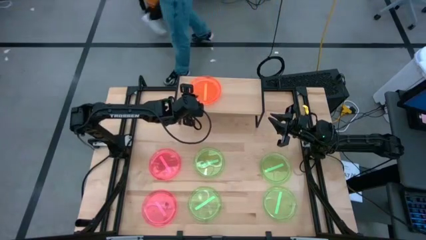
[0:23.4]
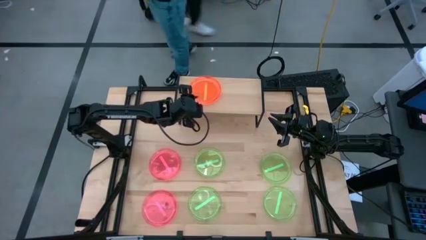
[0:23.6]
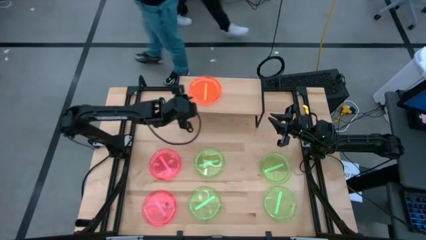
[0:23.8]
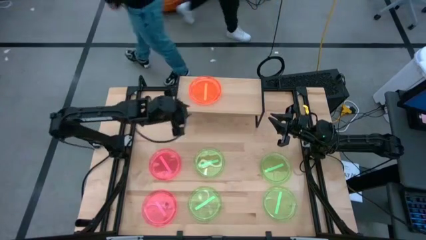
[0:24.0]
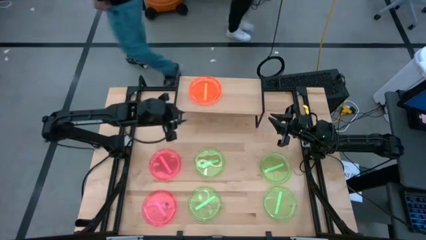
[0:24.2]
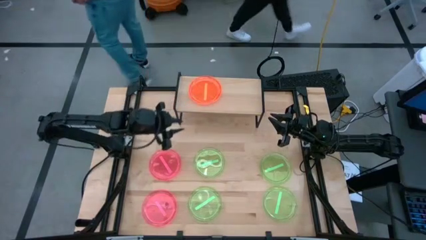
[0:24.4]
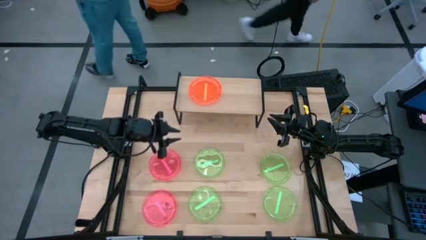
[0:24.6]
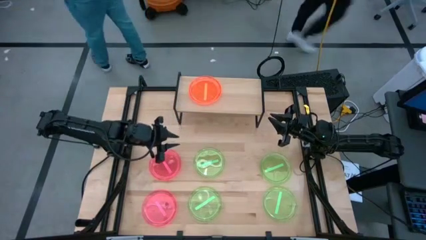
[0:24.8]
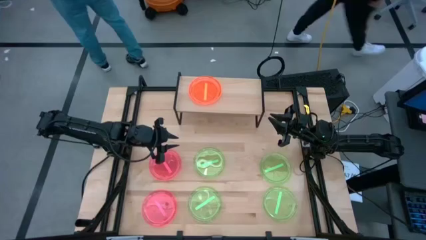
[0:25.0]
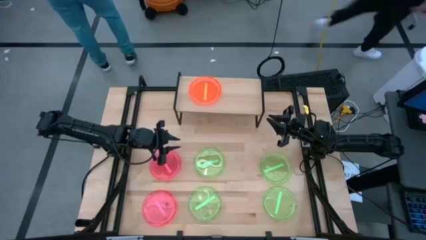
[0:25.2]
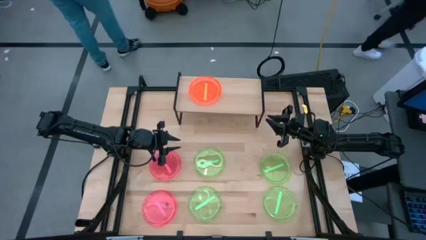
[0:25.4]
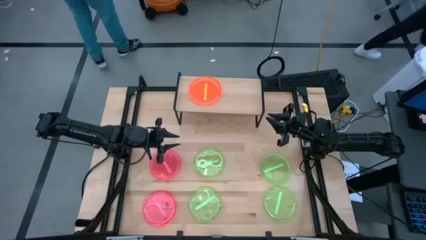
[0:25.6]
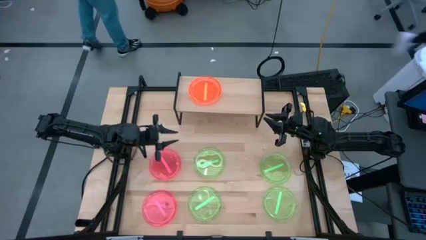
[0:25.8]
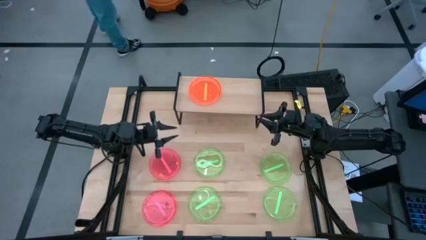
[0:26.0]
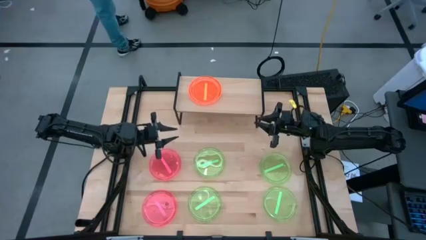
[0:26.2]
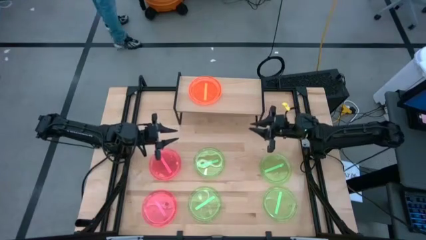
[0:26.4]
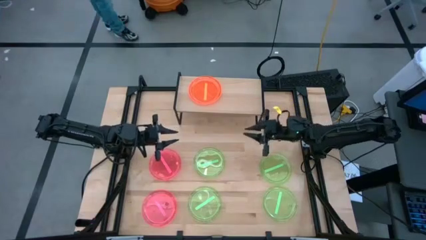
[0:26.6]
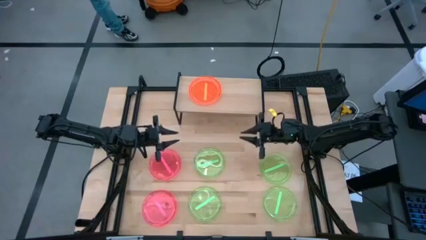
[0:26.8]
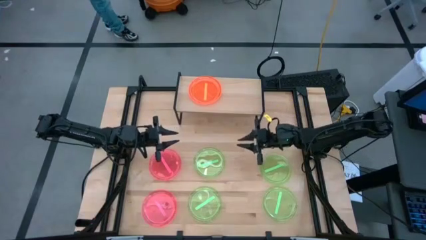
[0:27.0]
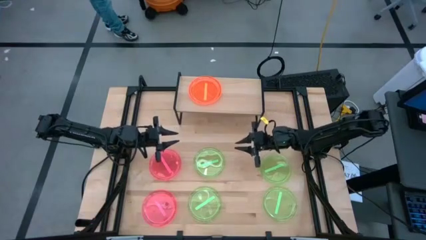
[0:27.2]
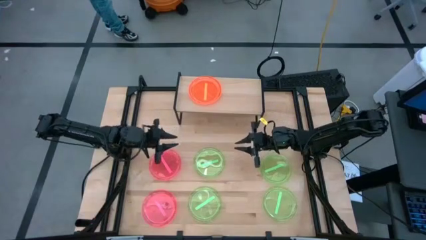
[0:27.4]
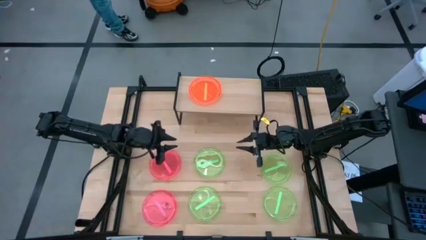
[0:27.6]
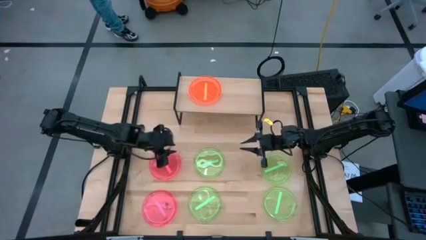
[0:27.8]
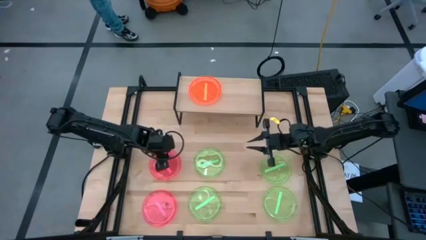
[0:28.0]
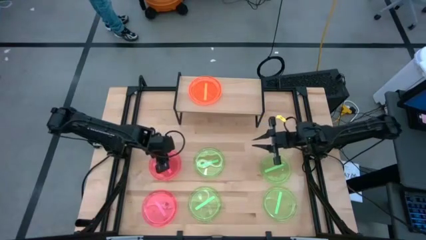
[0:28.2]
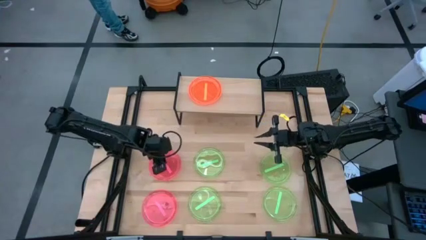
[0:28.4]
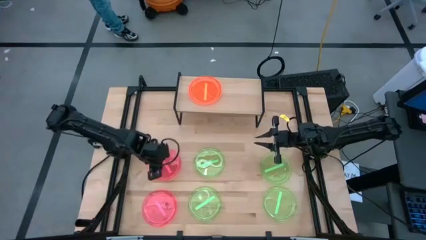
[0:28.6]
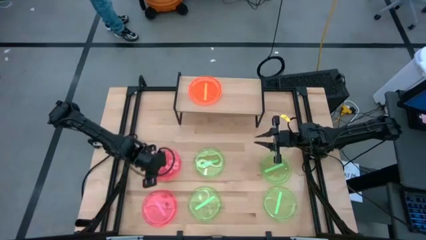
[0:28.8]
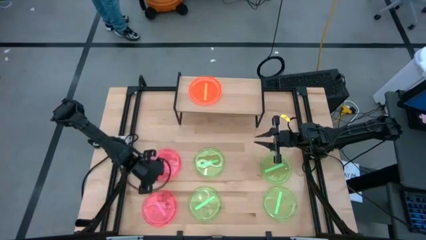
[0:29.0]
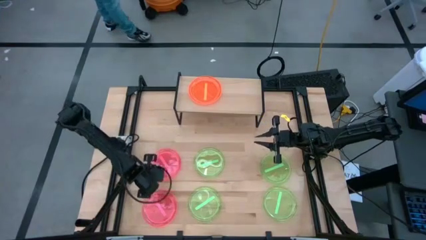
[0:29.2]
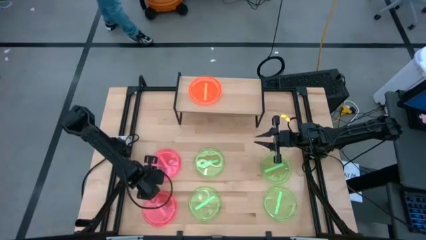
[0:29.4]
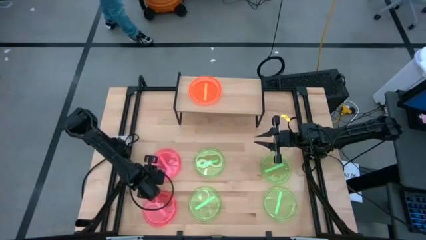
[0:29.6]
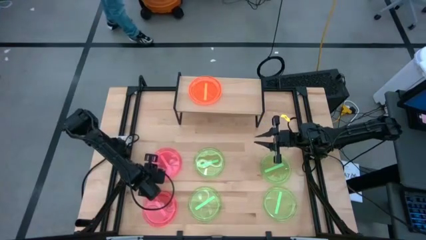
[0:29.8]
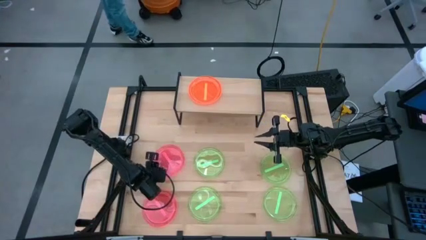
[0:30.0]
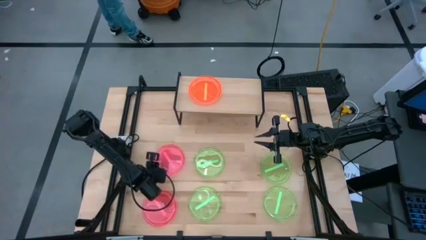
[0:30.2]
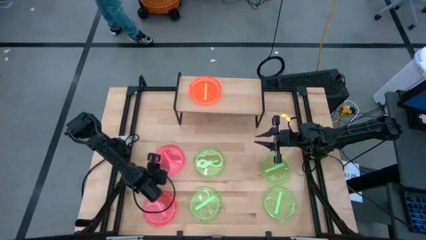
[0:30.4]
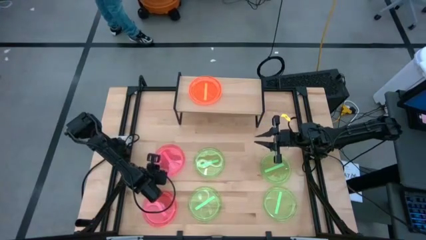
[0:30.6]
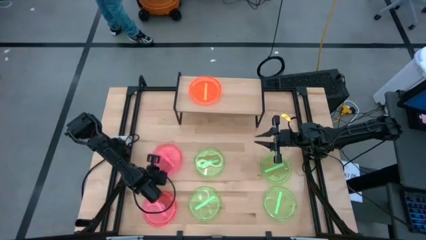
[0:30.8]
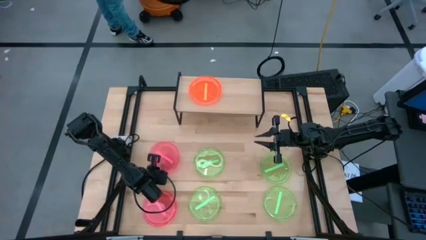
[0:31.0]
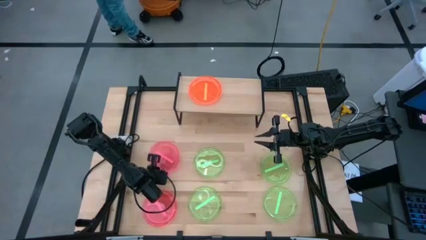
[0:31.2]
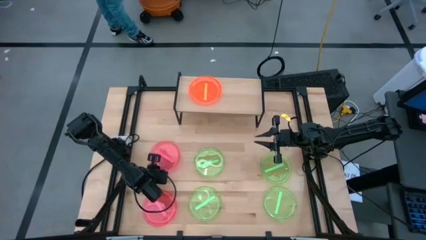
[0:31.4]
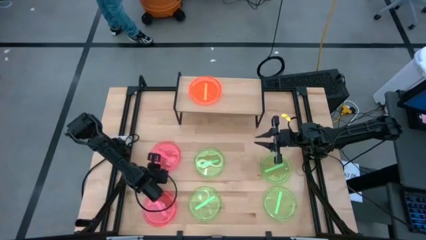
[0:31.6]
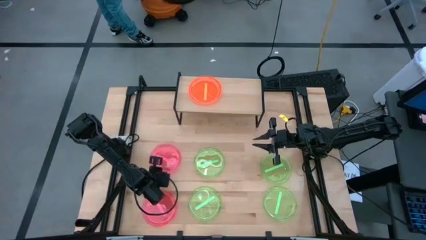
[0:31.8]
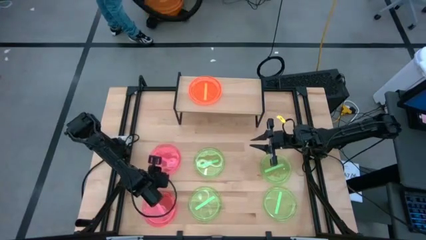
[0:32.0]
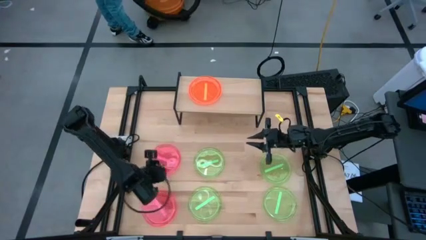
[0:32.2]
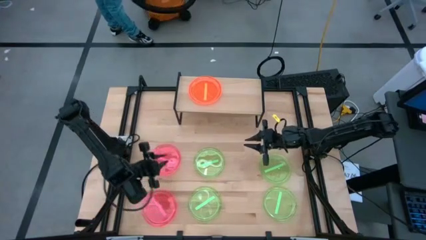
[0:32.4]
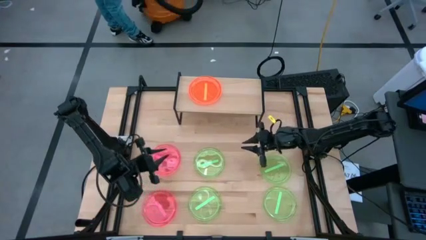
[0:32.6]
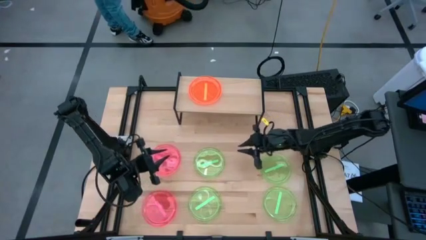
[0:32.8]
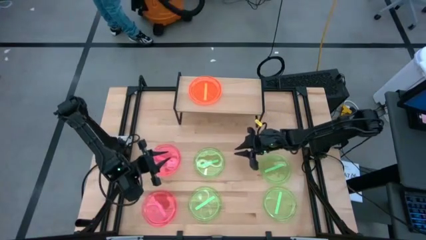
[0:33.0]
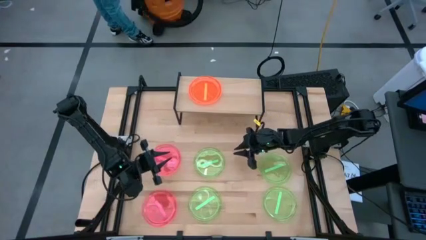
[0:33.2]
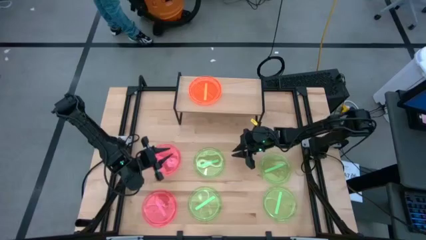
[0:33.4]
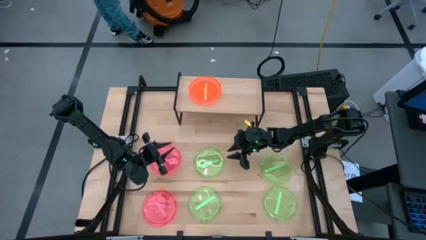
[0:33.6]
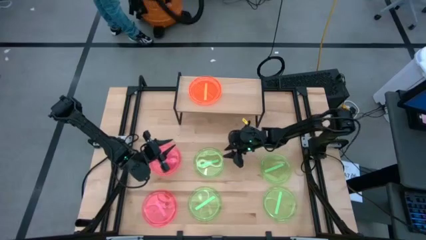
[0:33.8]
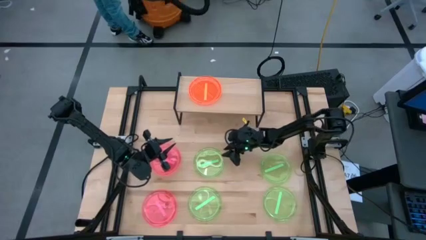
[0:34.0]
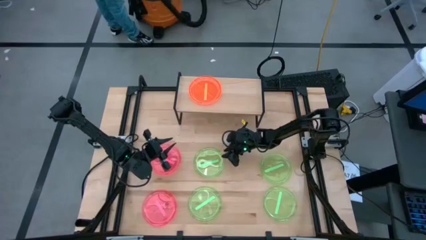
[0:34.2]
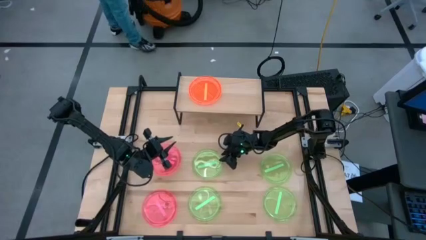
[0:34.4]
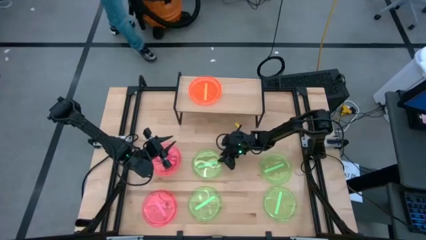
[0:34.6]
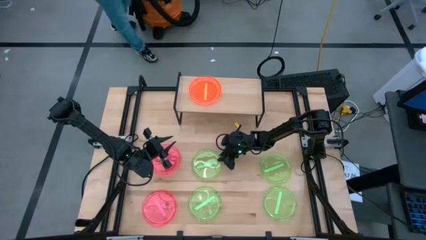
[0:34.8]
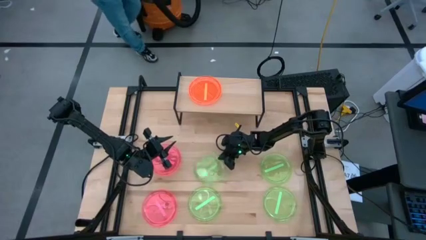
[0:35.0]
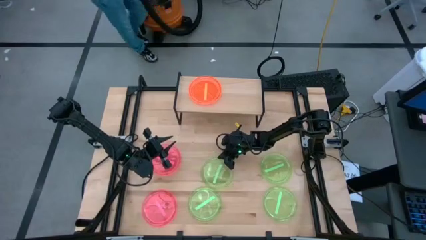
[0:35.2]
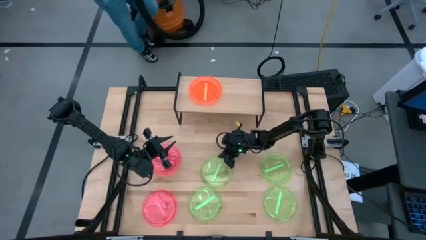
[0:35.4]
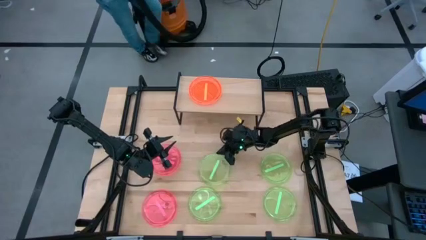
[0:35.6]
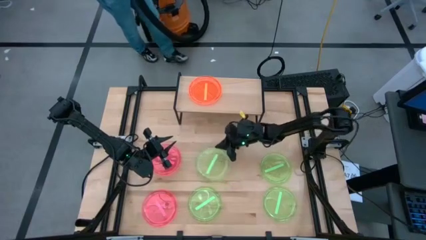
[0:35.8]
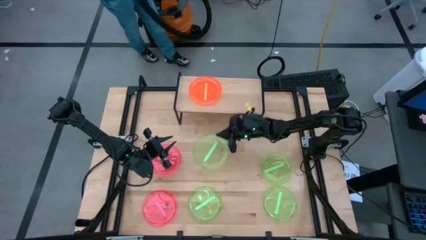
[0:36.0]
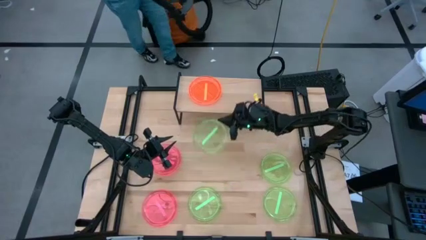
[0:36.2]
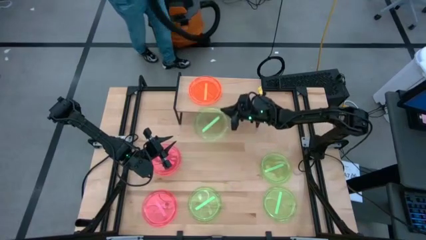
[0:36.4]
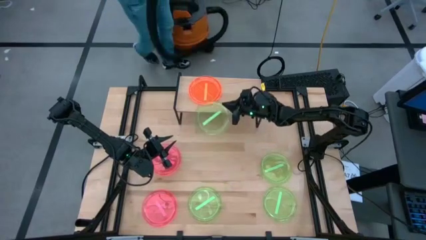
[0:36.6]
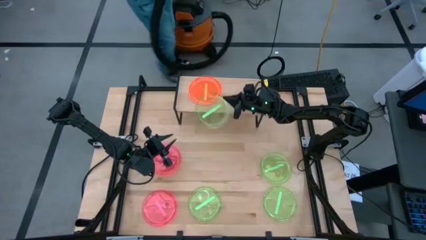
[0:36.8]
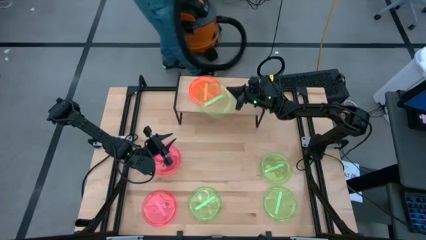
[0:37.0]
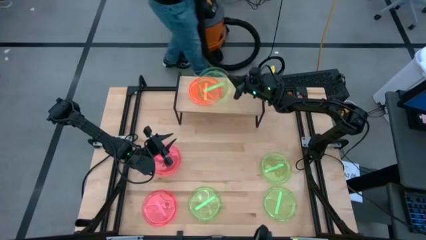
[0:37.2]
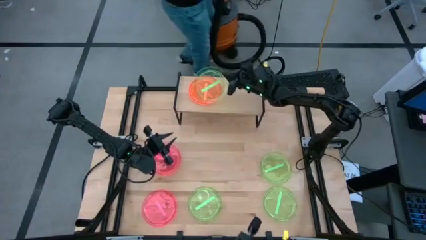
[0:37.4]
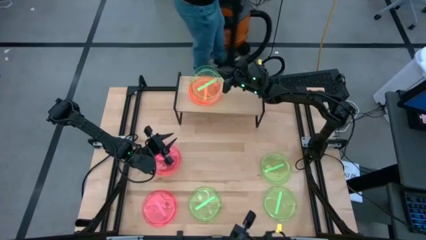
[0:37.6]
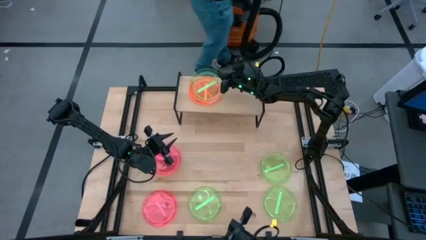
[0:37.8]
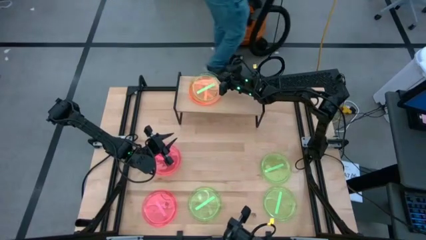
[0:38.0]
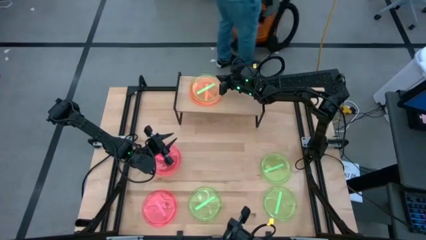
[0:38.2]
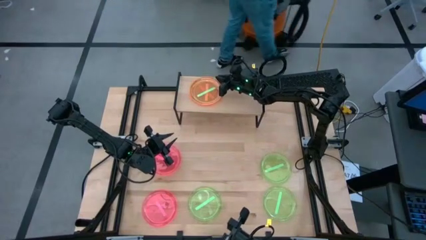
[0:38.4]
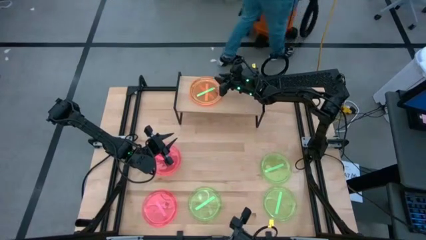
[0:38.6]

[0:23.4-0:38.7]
Task: Place and stack plates onto a shelf
Stack the top left green plate on top of the orange plate
